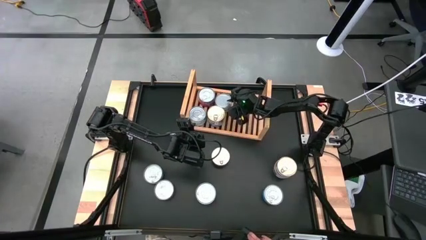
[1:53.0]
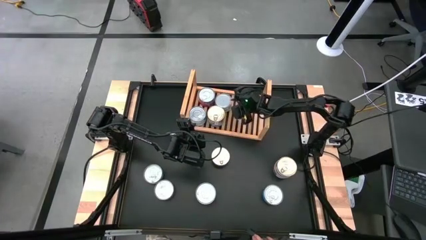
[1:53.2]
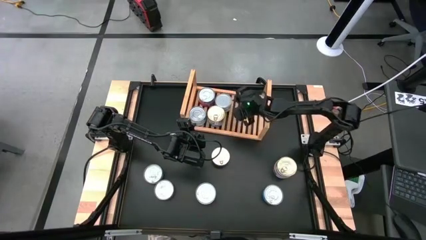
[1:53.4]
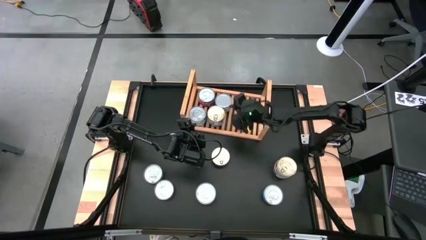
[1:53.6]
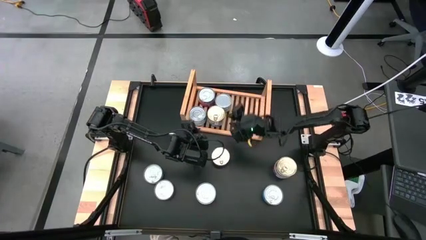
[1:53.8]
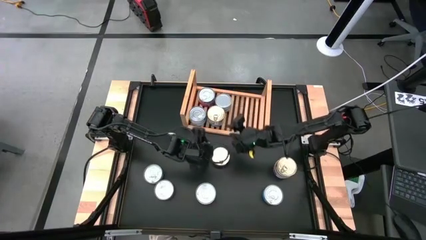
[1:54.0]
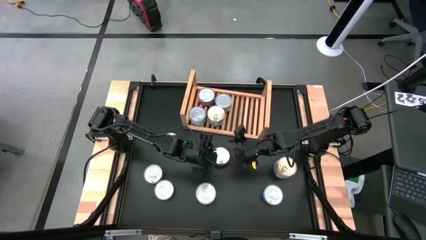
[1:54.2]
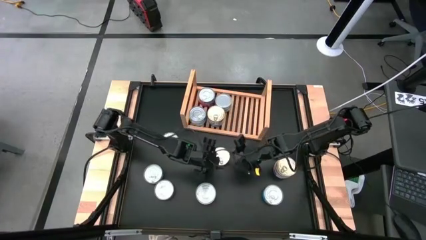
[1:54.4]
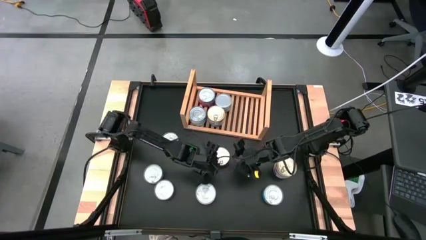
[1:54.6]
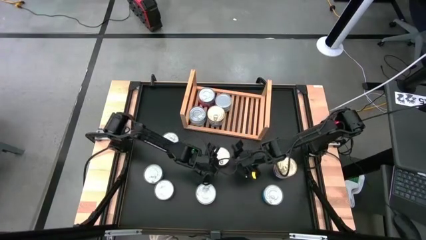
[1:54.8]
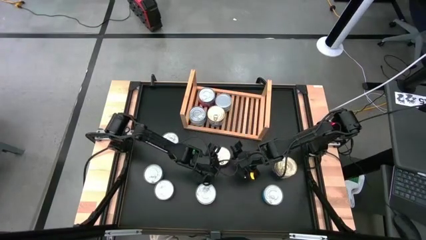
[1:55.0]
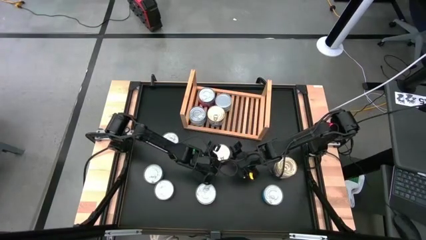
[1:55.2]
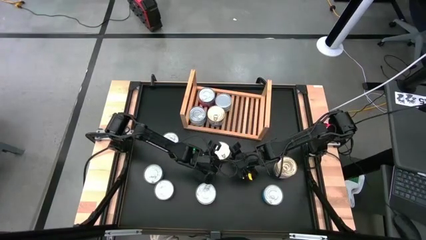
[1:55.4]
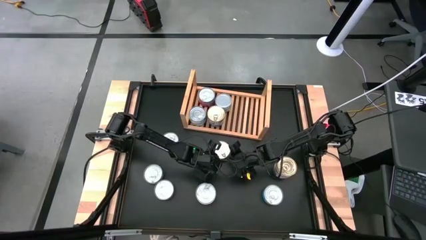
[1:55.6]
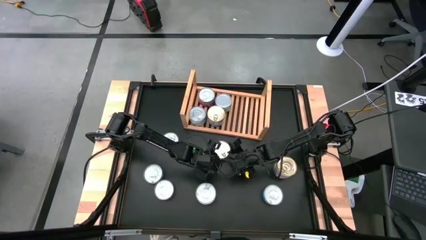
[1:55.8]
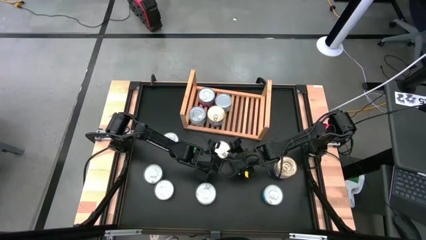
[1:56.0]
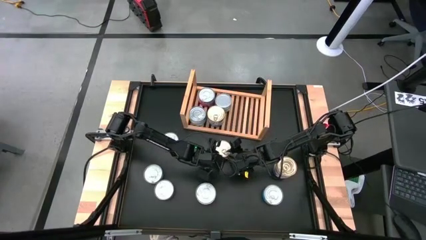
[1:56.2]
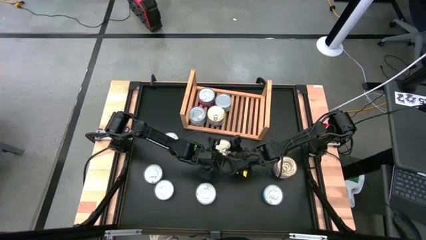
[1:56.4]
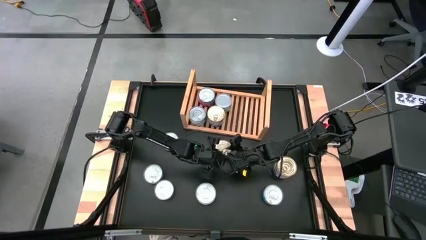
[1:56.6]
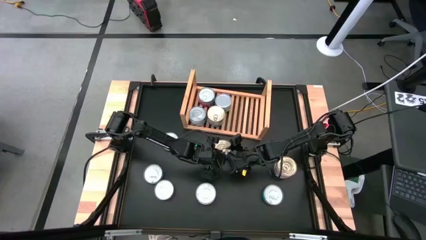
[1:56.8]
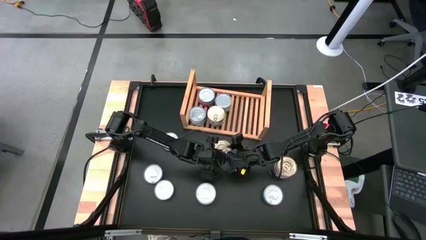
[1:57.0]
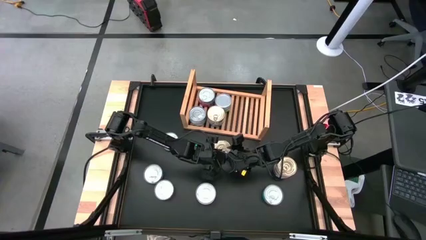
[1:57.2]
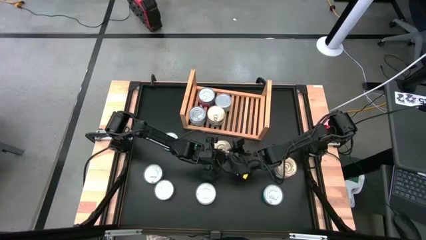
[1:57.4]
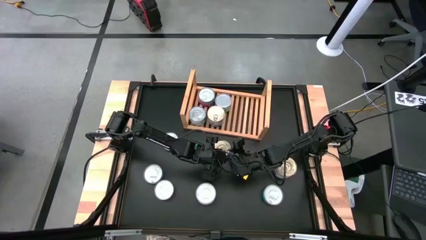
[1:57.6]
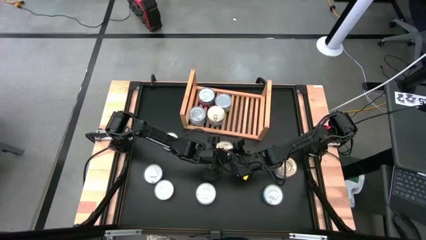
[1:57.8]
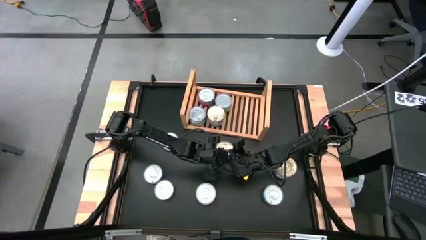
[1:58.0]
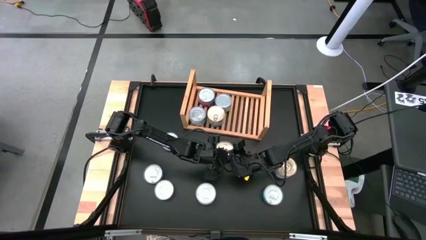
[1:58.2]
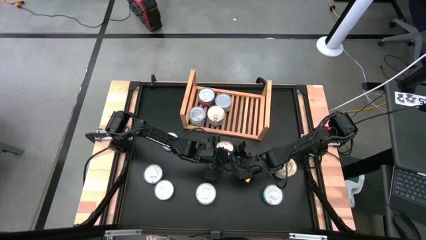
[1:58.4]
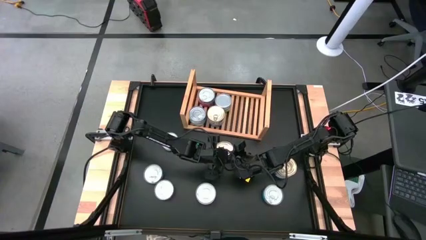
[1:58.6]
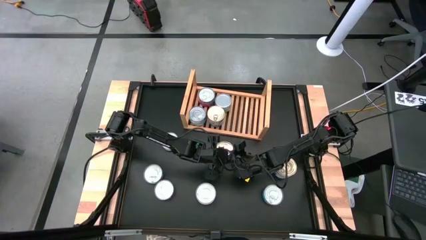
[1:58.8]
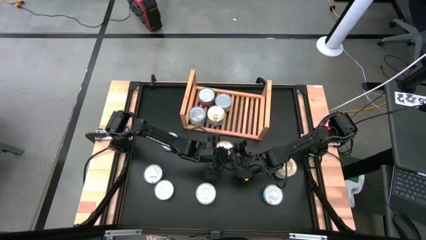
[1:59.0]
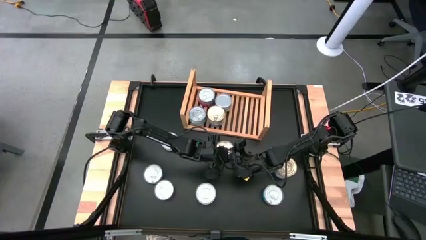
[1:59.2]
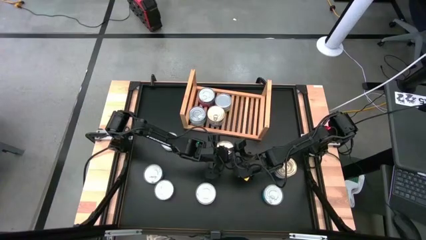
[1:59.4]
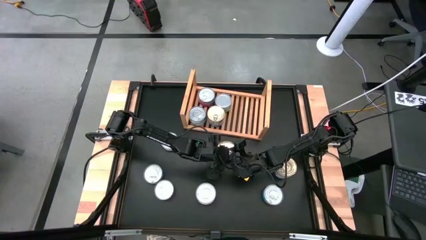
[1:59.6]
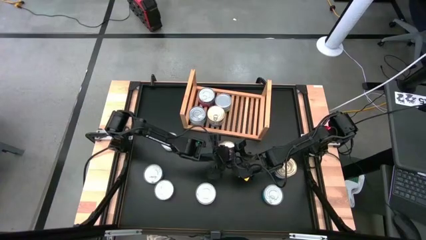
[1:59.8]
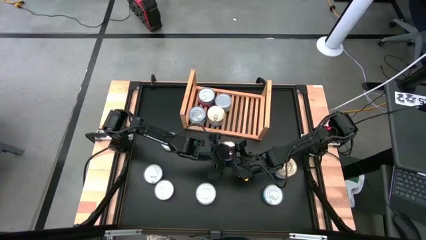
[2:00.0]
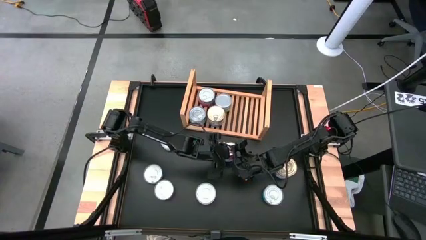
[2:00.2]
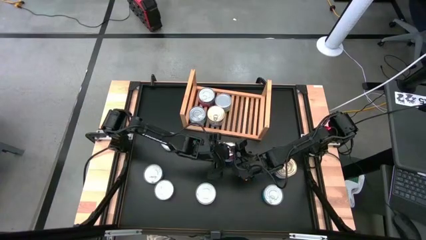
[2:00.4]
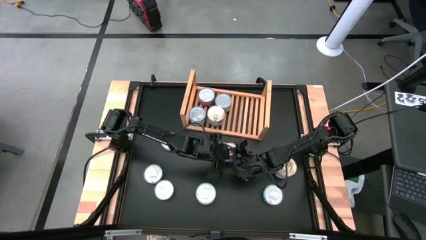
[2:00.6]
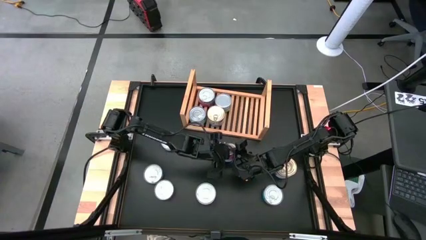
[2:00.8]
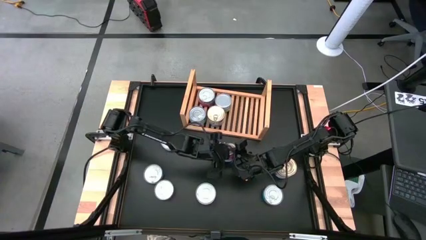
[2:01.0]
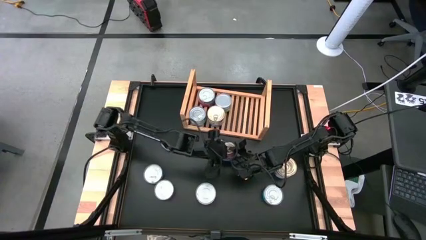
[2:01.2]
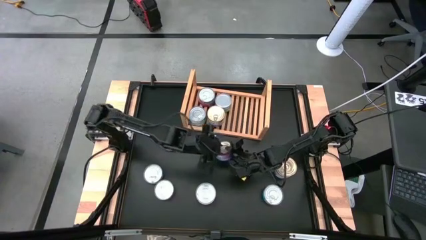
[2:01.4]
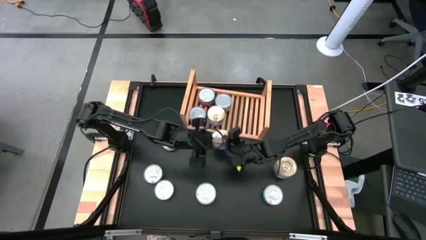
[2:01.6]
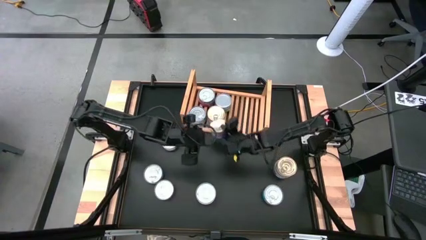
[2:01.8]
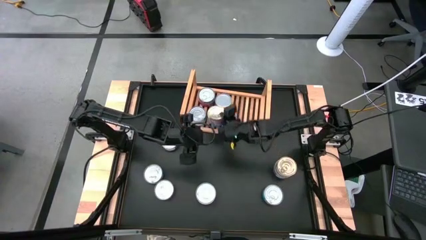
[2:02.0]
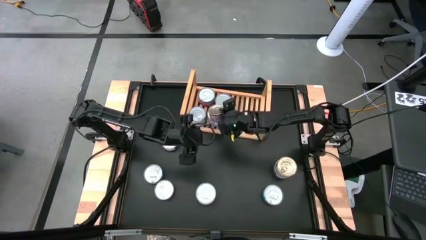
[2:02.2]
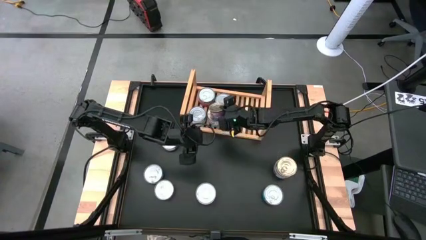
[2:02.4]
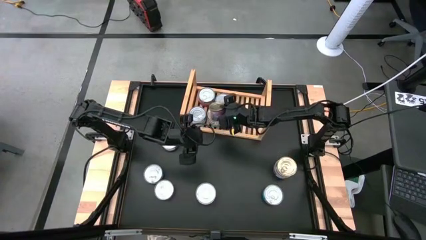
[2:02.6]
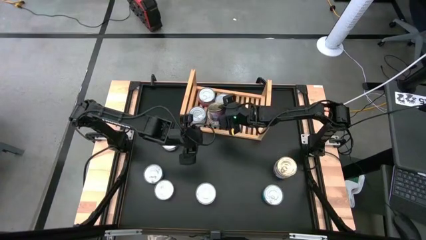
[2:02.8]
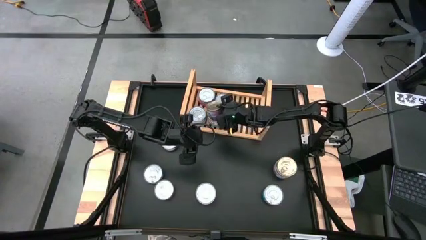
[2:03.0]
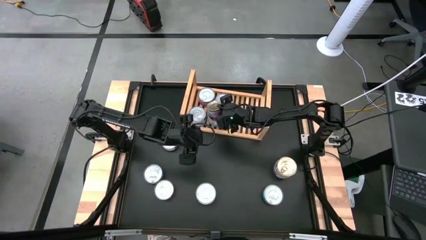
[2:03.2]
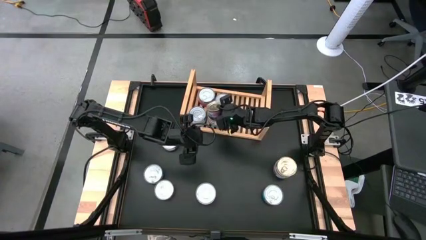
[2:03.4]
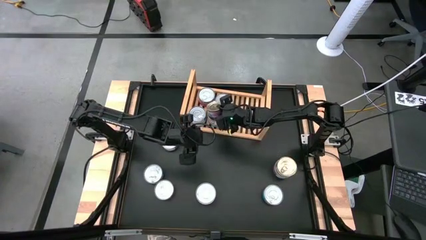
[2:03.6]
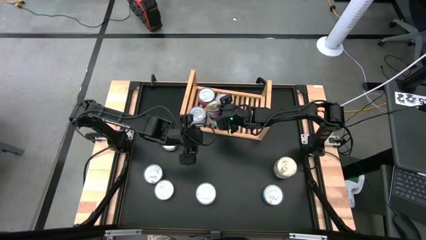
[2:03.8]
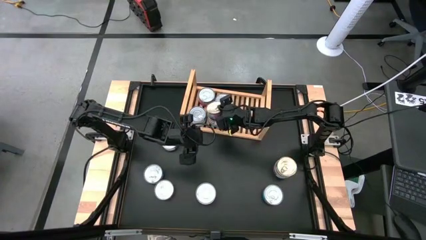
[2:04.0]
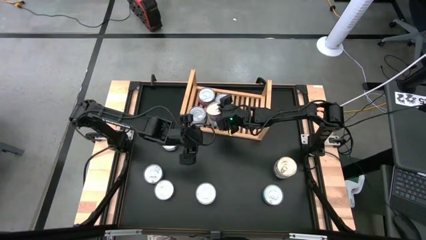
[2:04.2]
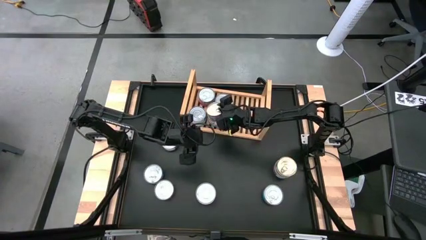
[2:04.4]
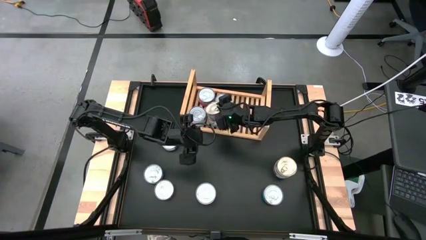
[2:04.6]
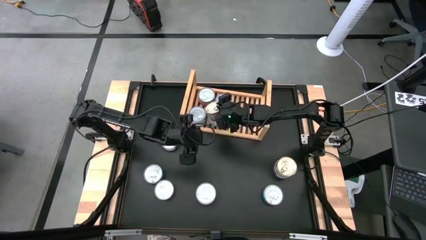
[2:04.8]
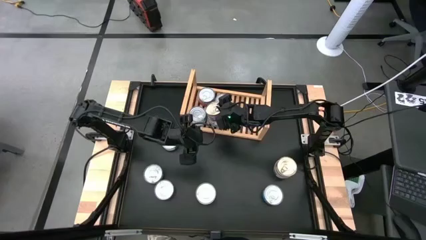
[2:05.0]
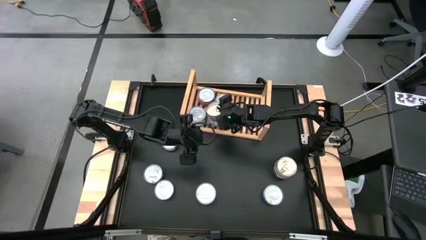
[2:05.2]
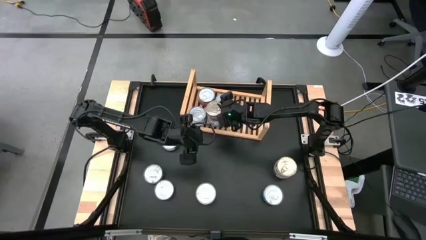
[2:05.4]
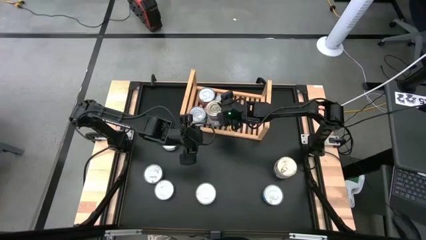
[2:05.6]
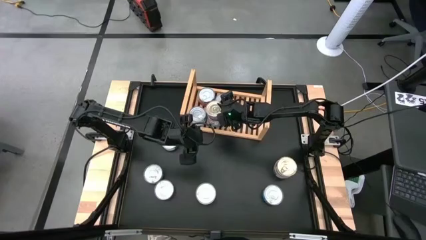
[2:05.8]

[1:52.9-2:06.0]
Task: Stack canned seafood by type on shelf
Stack the blue tuna can on top of the other blue tuna can on the shelf
